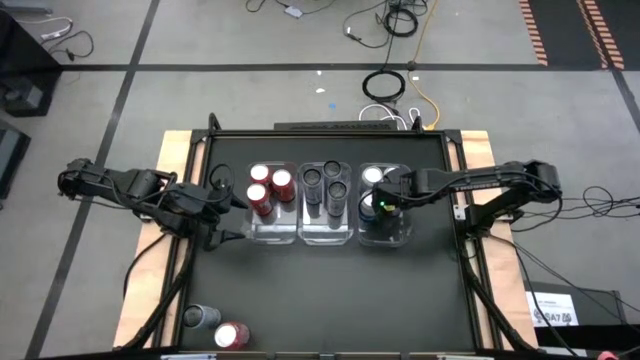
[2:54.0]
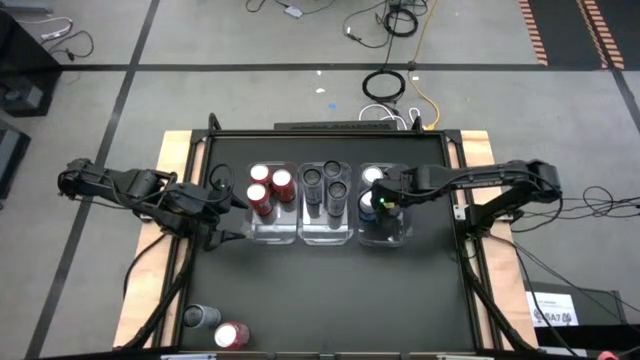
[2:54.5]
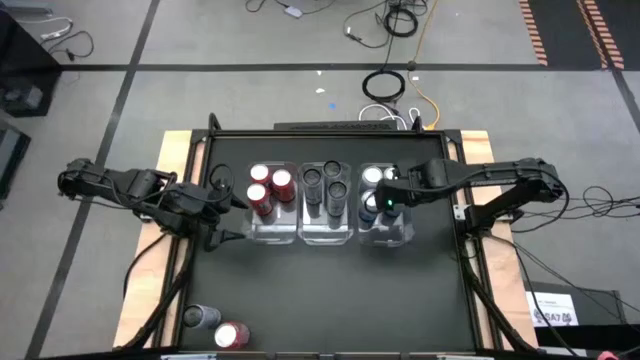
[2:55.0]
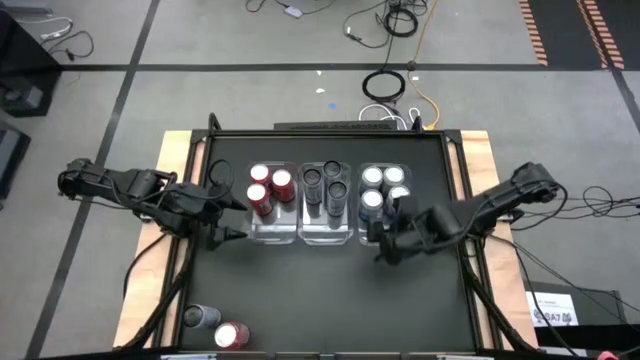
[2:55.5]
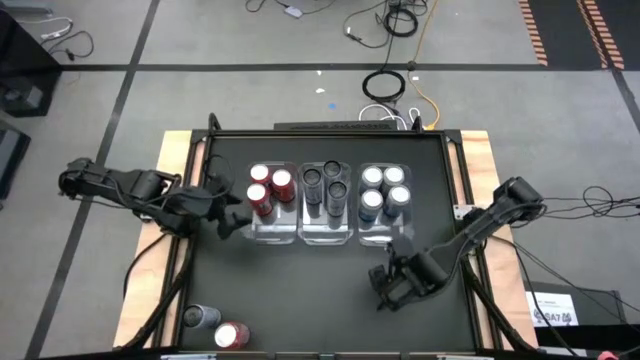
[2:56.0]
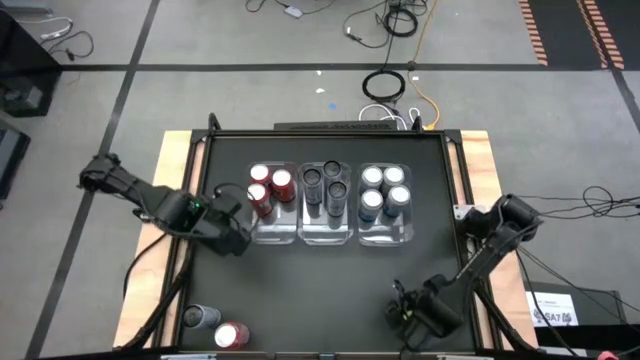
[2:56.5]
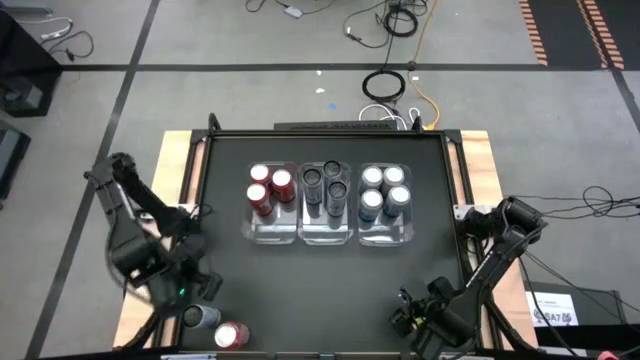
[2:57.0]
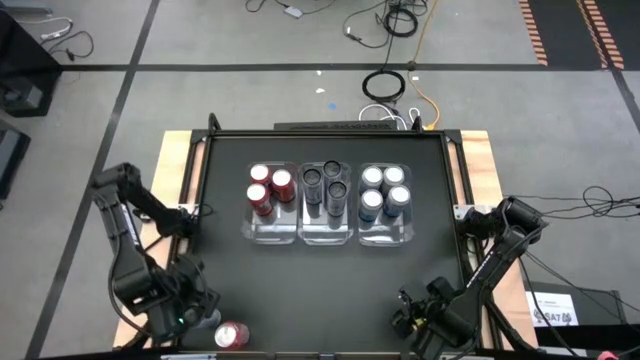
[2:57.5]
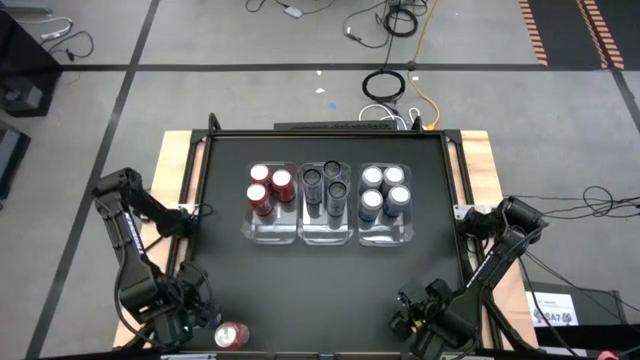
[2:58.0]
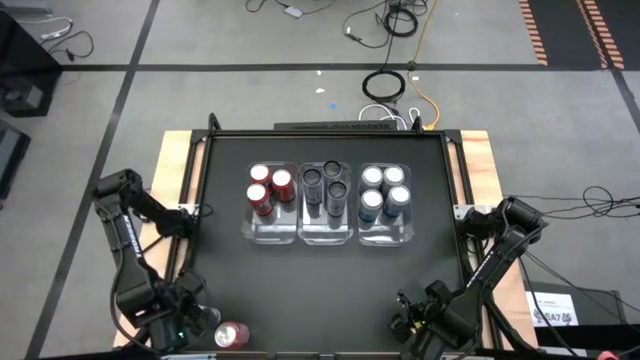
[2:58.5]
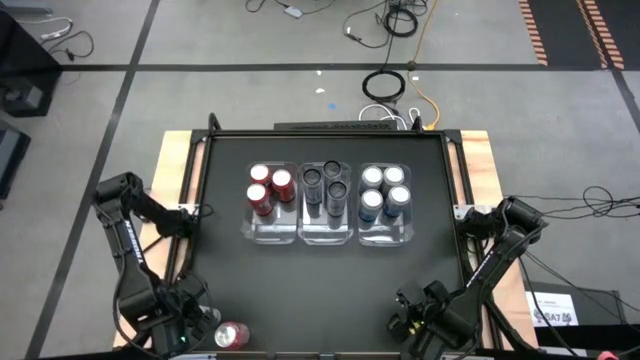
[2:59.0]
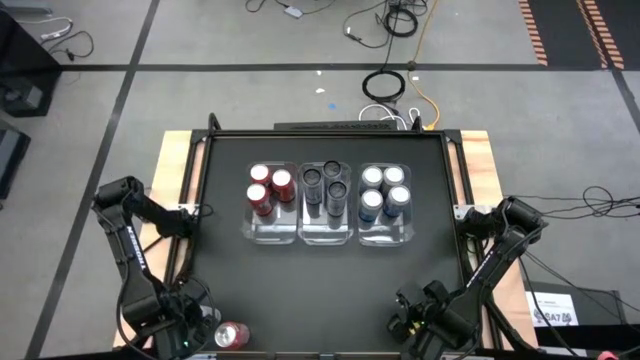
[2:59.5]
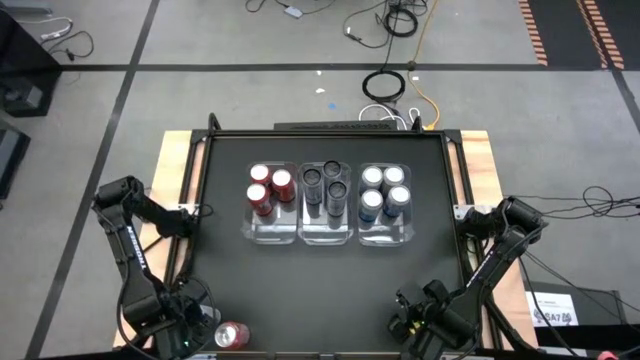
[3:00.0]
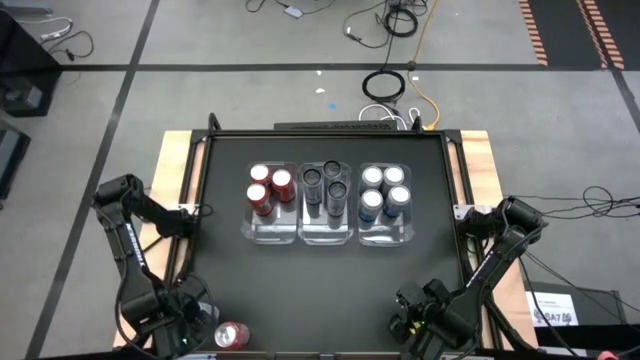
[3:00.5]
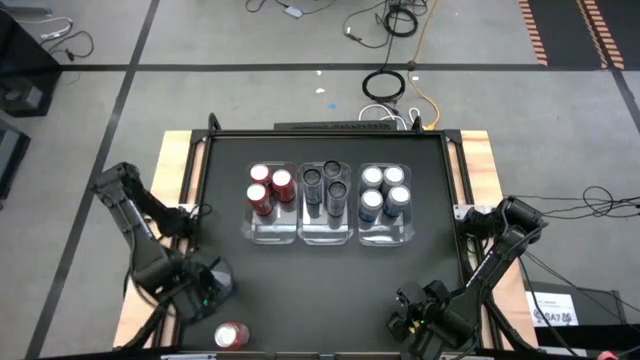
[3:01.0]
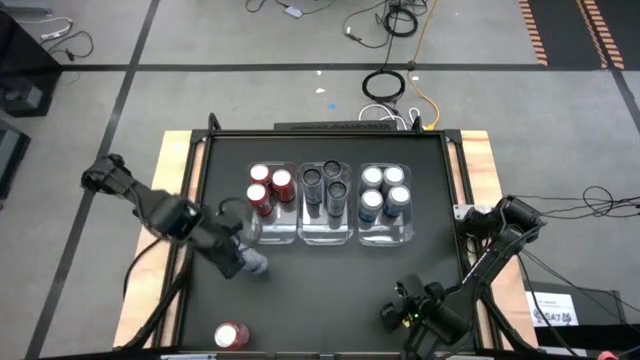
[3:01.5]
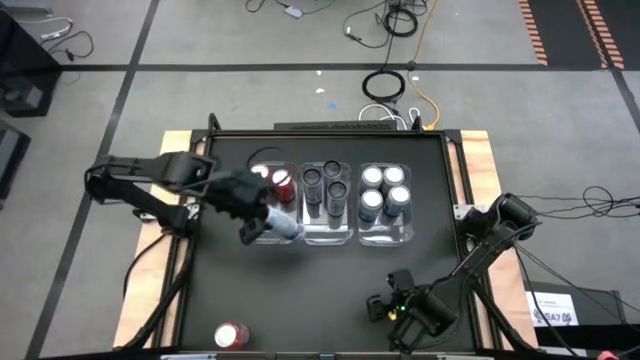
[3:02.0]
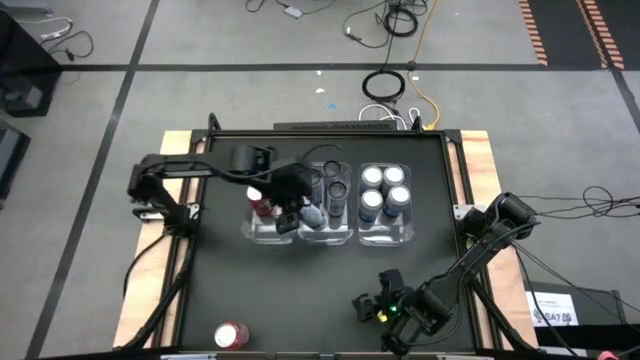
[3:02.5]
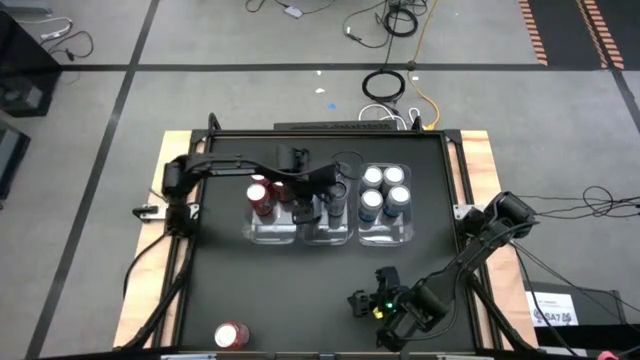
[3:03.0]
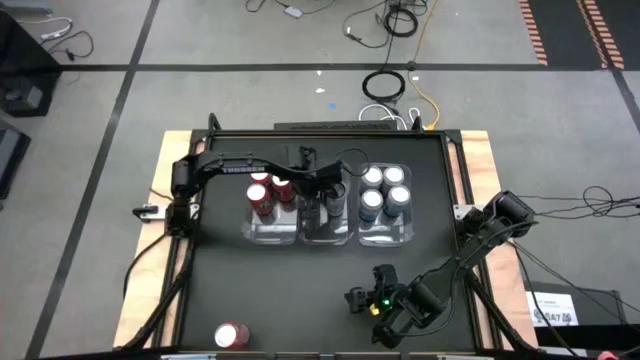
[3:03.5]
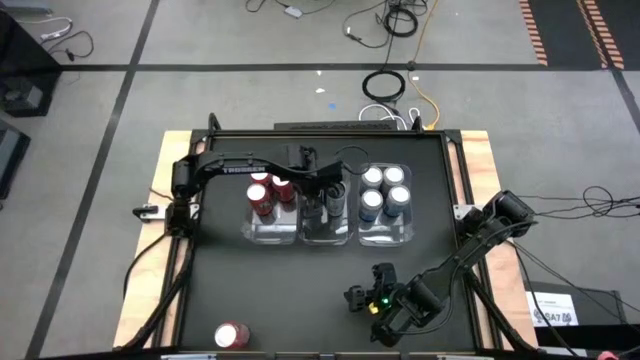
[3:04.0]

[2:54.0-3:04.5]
Task: Sort soda cans
Put the white-blue soda can into the center transparent bin

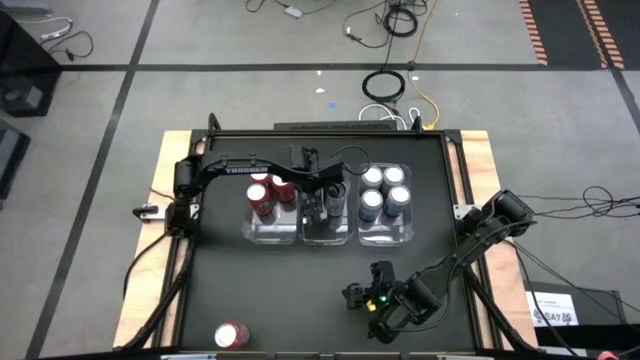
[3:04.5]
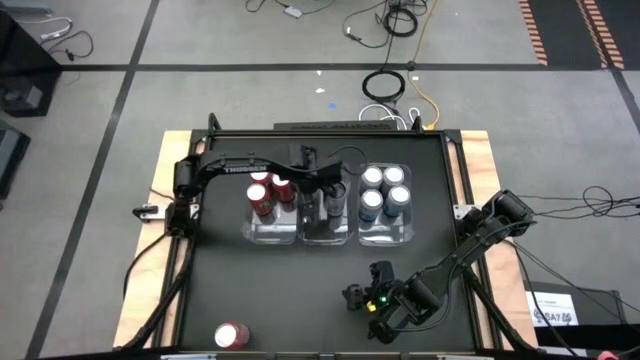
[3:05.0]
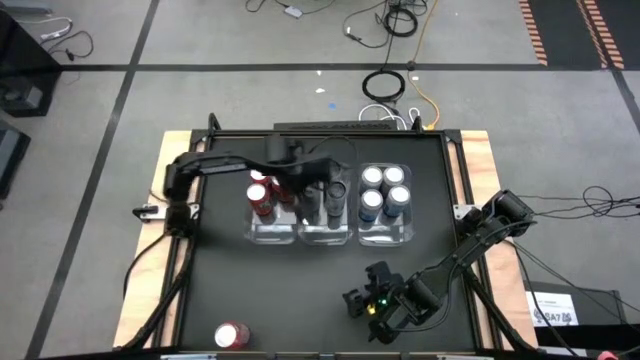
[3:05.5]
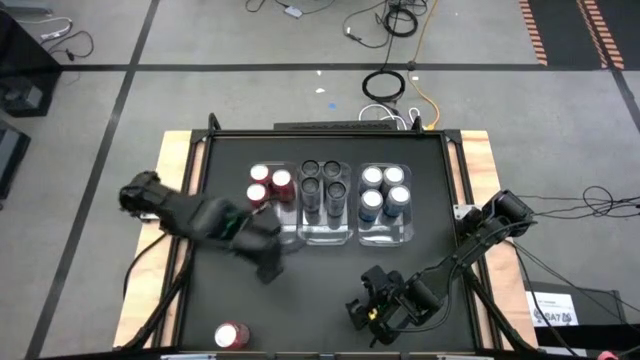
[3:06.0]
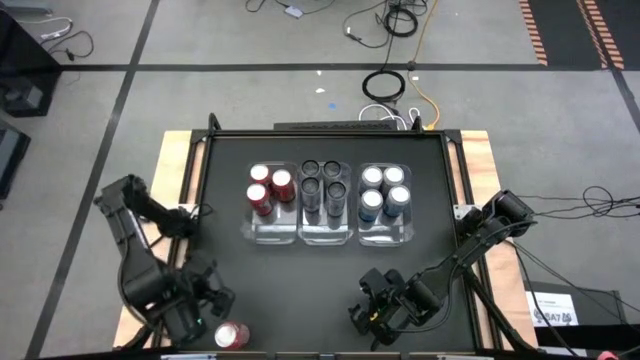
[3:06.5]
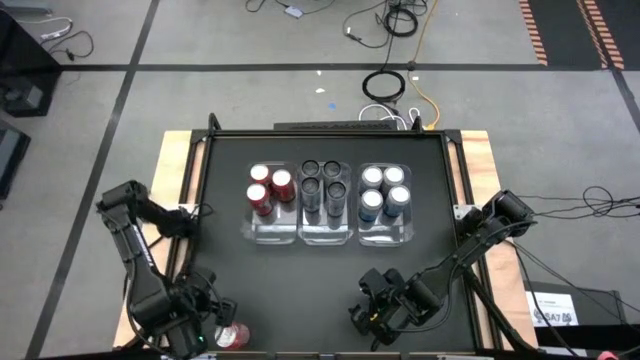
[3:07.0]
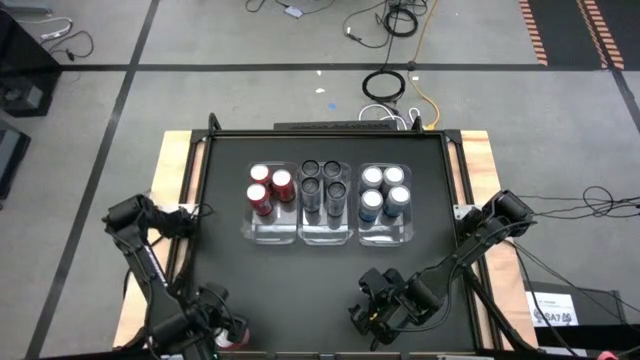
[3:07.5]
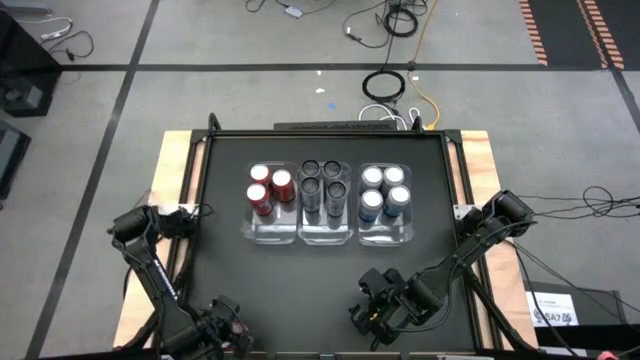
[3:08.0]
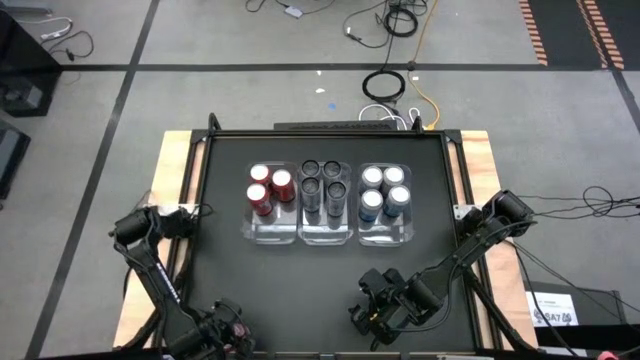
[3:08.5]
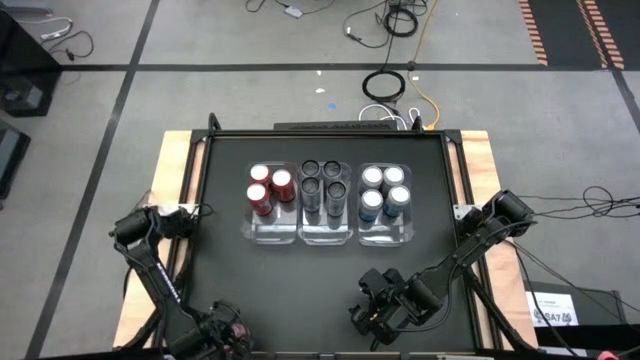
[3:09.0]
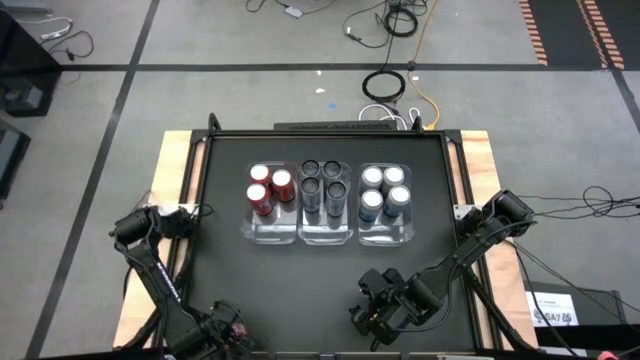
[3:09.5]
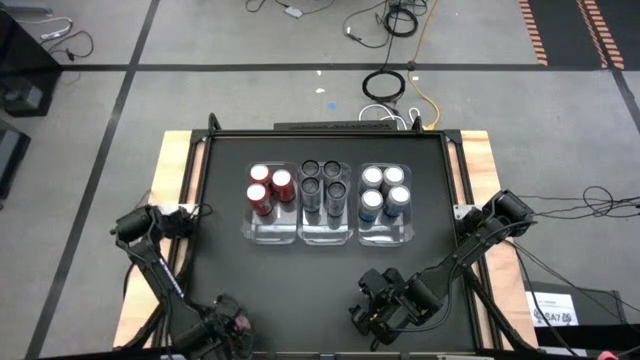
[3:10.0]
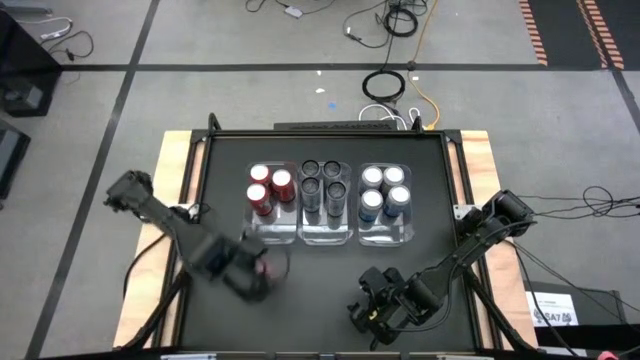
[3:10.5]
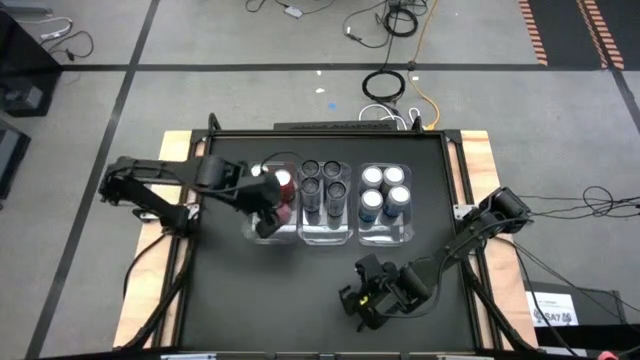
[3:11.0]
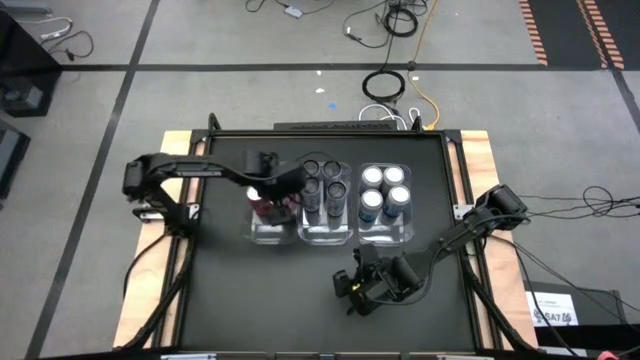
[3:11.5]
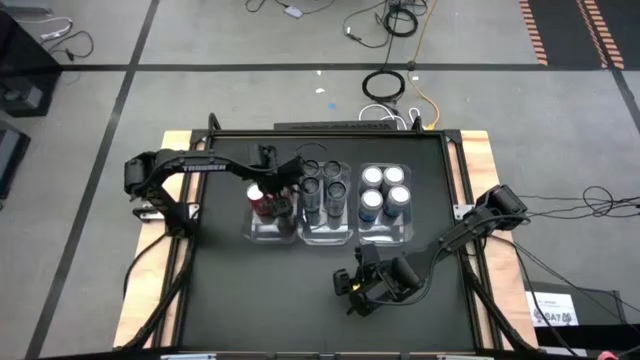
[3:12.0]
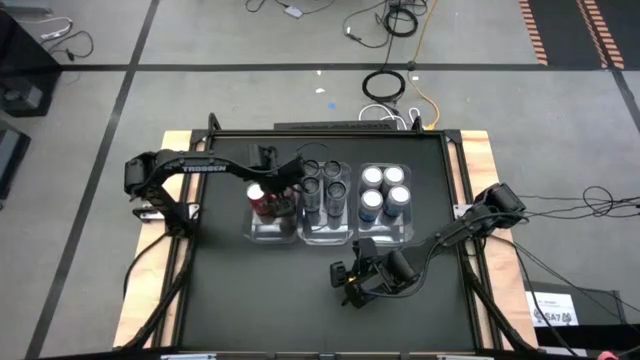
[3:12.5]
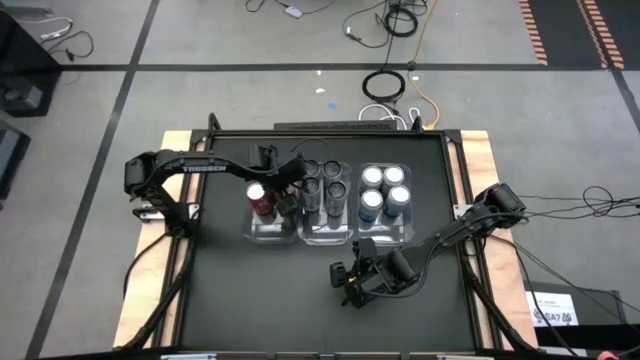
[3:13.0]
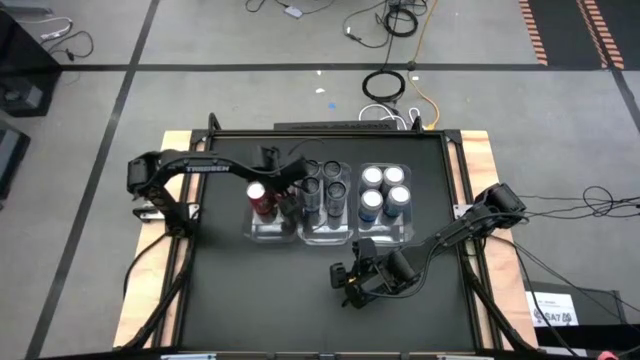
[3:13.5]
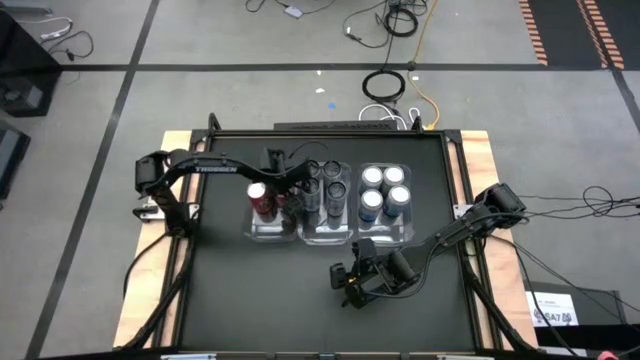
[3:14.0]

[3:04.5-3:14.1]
Put the red soda can into the middle left transparent bin

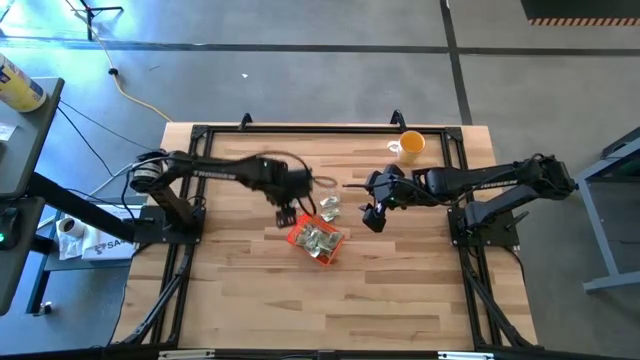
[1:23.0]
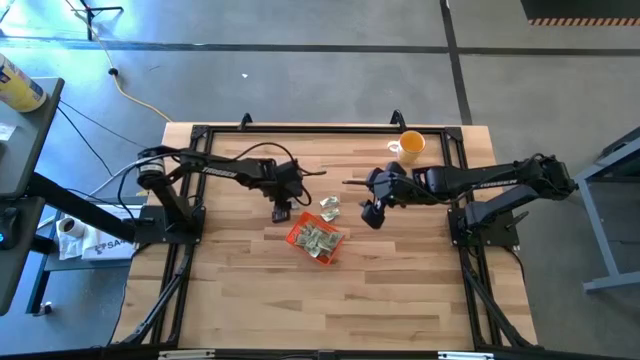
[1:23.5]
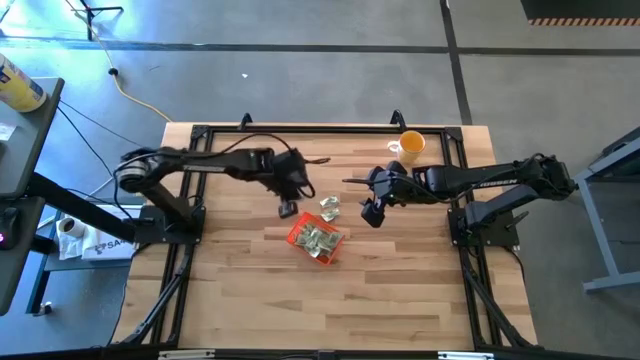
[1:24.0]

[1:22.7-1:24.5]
Task: Pick and place Stevia / Truvia into bins
Put the left stevia packet into the orange bin

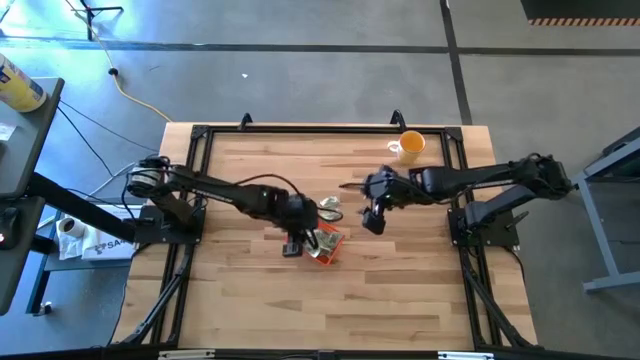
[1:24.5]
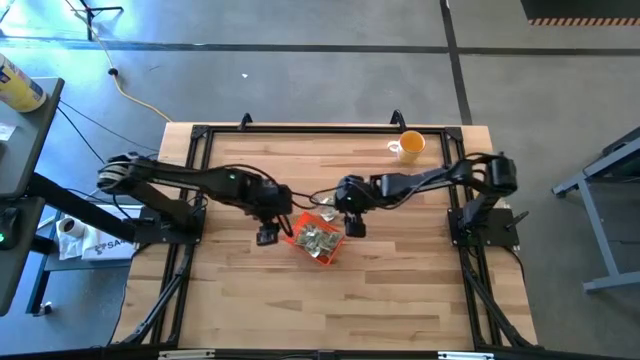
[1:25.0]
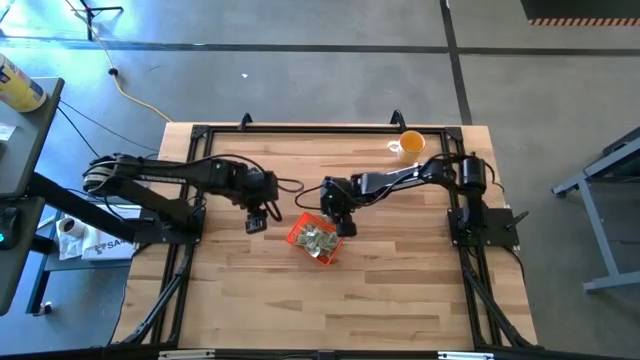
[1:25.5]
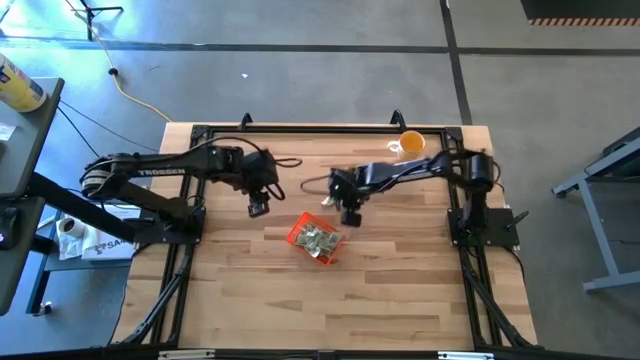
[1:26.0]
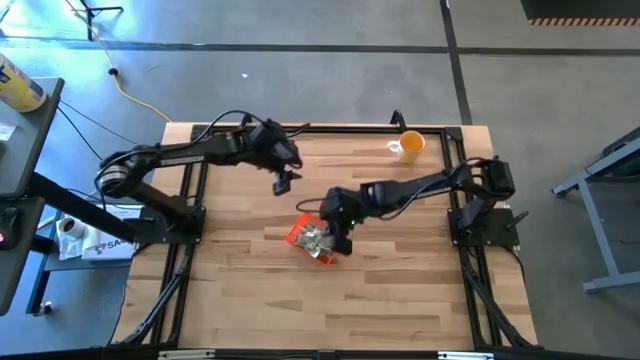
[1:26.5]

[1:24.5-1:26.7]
Put the stevia packet into the orange bin
